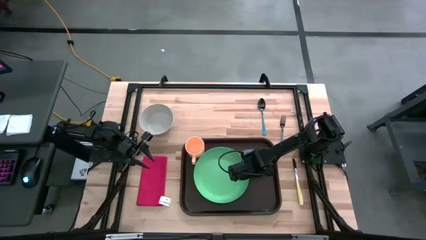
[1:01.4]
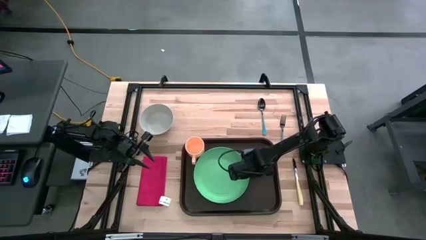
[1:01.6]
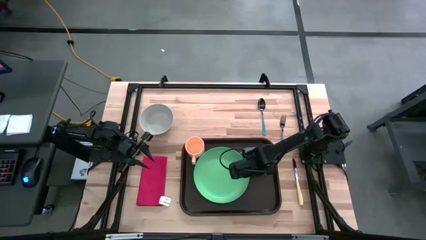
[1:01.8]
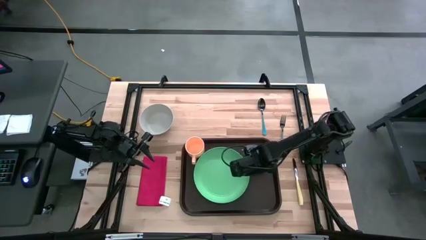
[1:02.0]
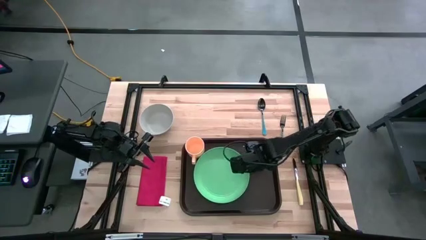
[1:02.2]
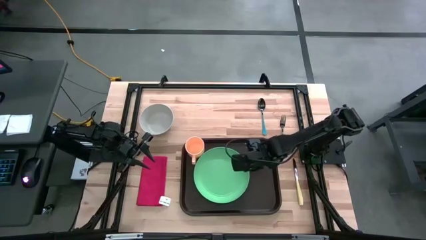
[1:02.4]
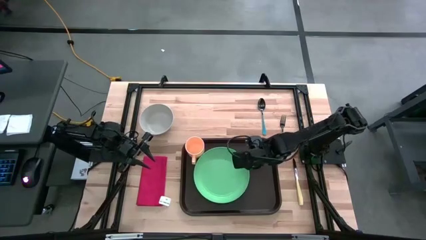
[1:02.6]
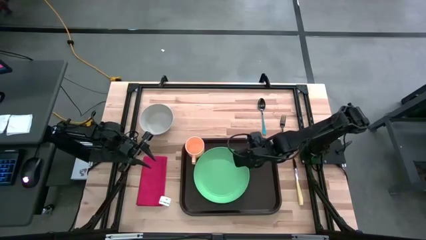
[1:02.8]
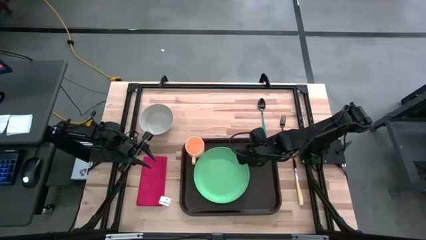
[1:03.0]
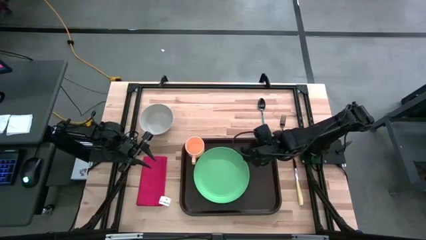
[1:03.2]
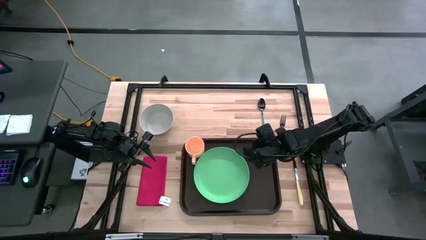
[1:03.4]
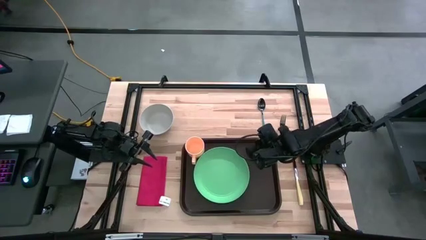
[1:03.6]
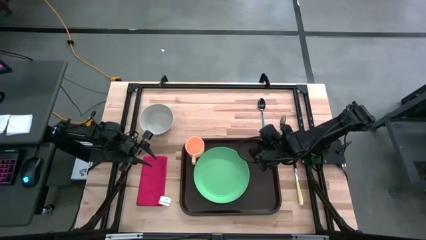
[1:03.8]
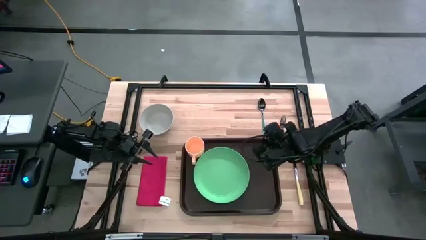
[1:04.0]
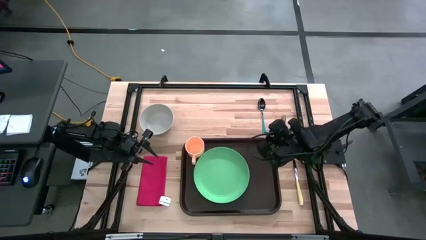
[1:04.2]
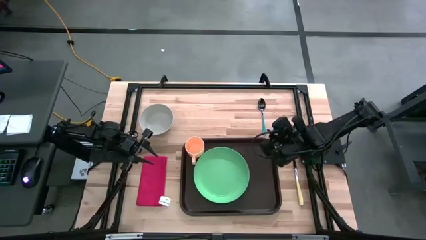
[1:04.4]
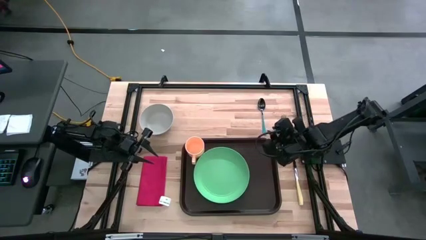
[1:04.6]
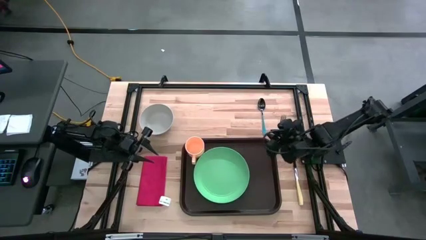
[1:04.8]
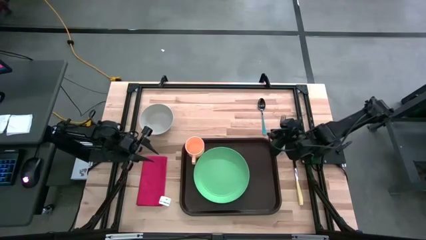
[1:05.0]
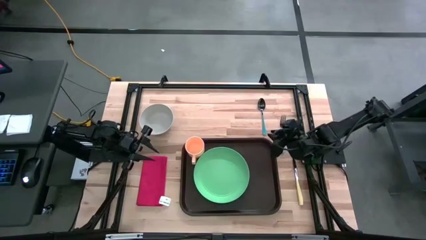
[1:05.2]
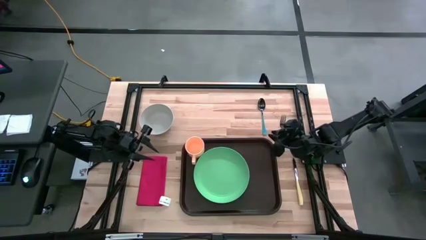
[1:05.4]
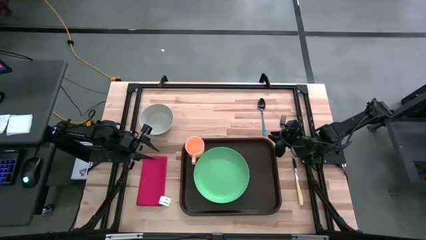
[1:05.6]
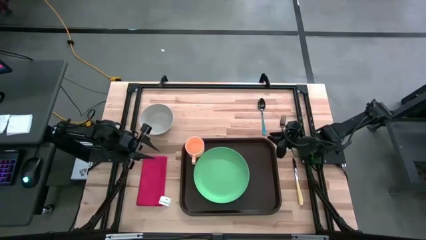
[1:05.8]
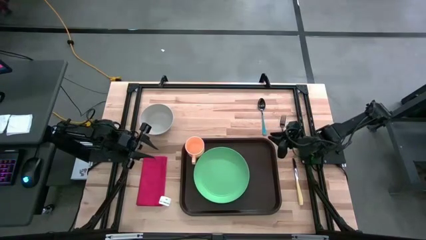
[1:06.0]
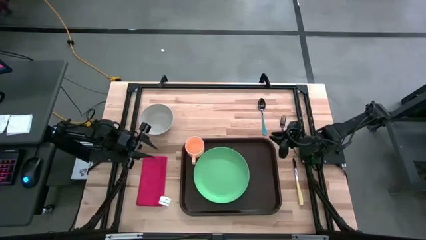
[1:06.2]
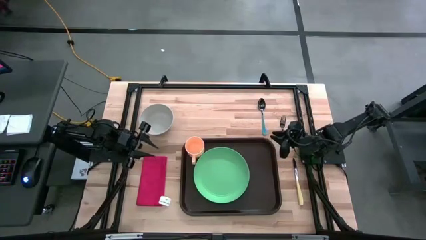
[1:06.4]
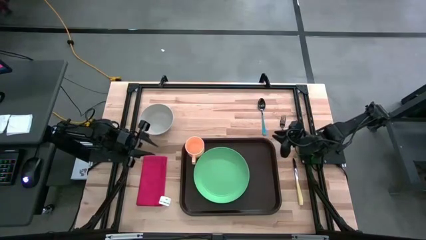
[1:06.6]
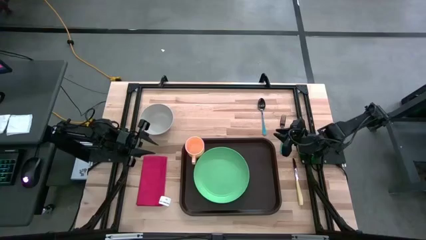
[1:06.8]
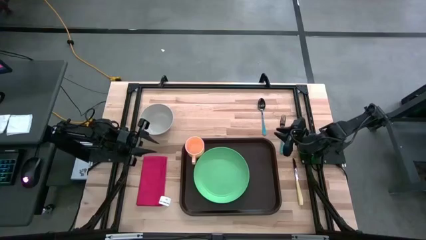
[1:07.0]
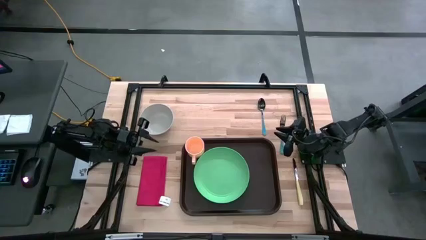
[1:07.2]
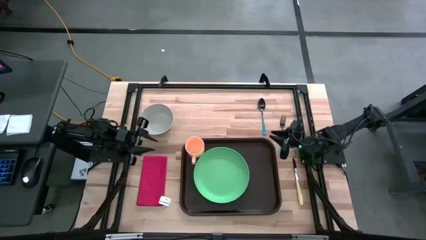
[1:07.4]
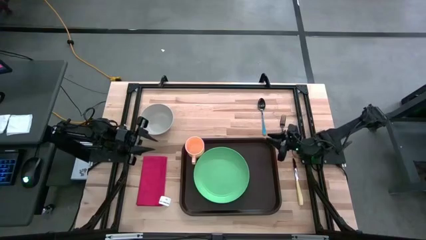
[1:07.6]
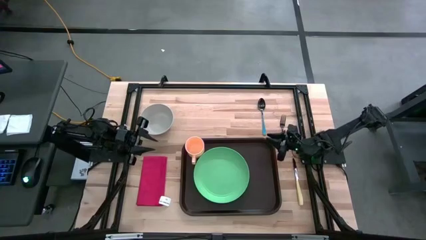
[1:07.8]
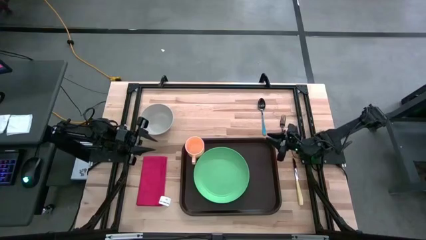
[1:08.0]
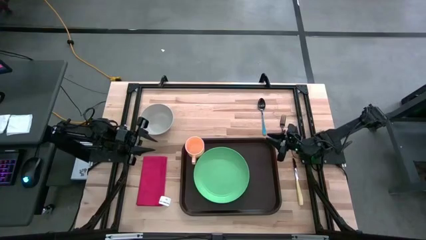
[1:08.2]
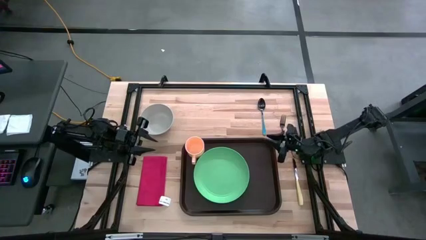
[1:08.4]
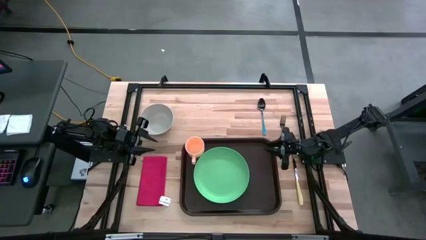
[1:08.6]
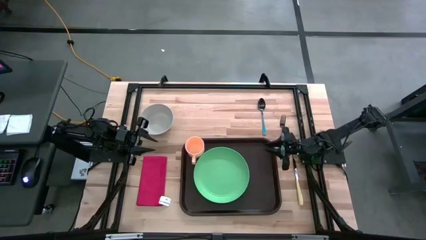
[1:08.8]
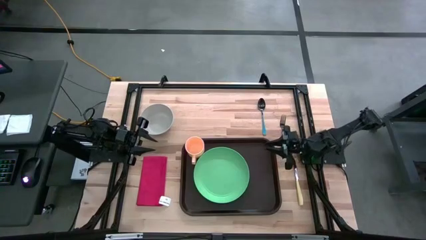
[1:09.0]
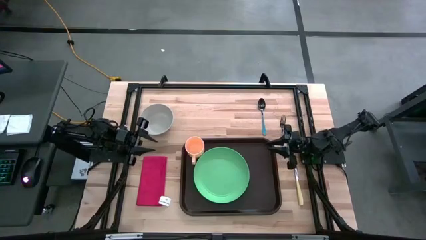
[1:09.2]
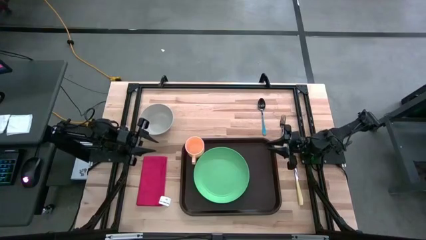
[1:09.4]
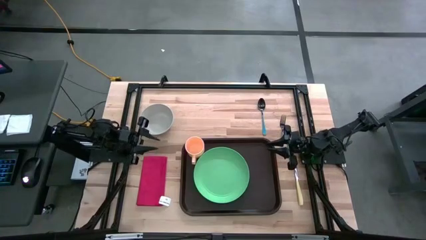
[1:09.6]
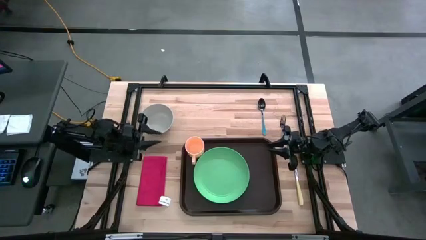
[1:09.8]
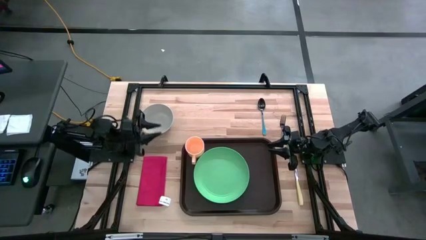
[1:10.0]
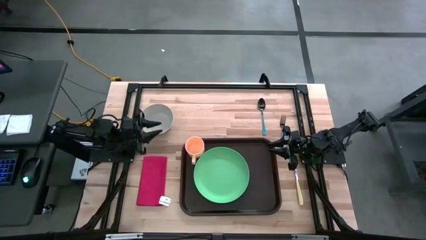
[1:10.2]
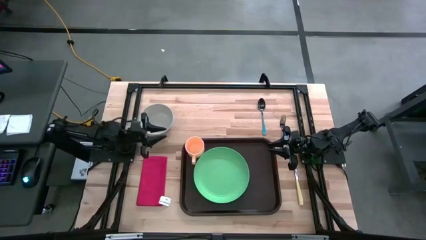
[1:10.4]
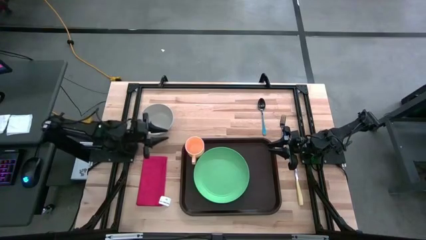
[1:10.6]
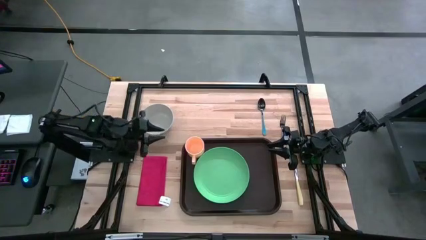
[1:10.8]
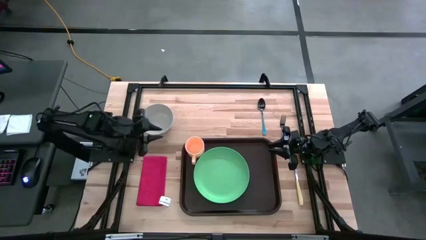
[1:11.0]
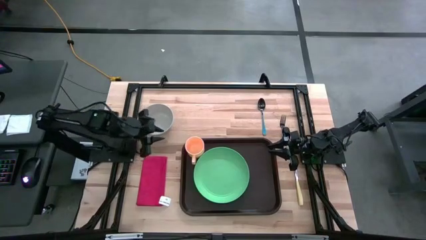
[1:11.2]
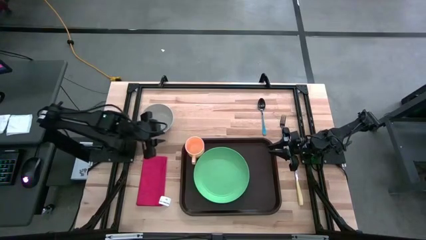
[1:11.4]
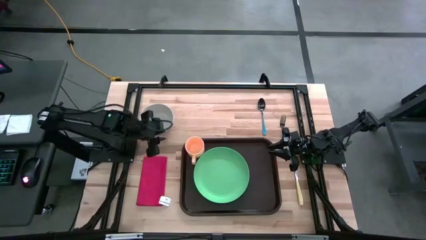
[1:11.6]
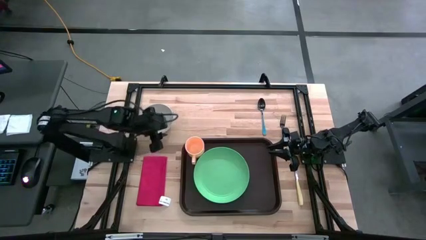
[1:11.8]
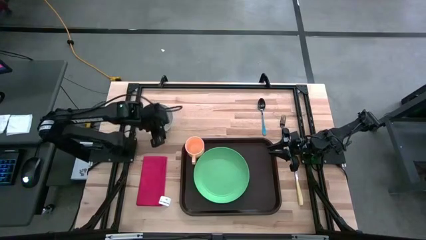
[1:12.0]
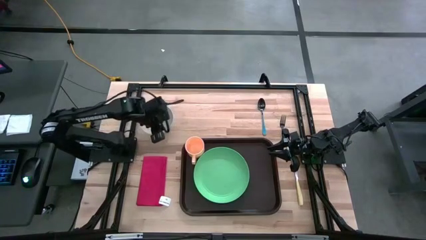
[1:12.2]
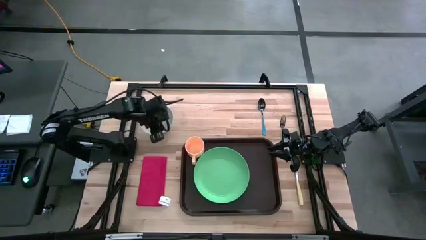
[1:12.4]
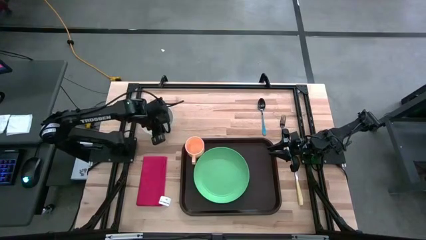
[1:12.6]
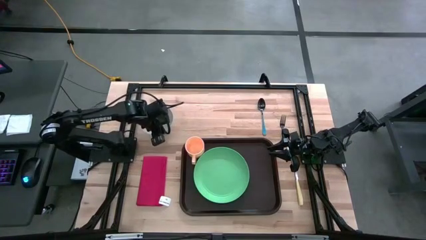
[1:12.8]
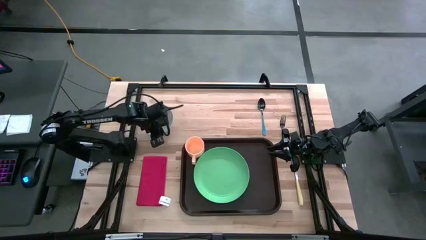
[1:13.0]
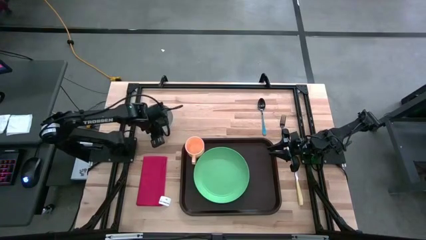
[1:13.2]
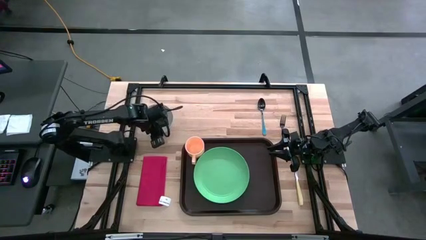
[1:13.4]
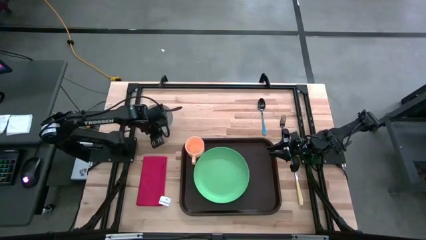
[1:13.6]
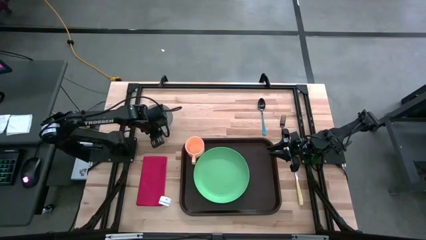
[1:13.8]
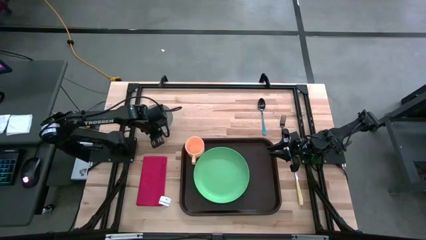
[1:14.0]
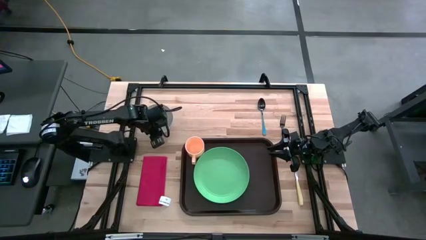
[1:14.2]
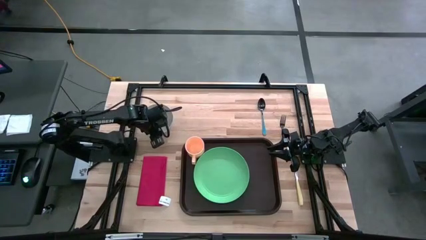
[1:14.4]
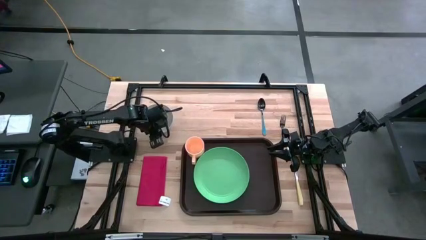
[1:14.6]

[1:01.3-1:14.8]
Task: Set up tray
Put the gray bowl on top of the green plate
